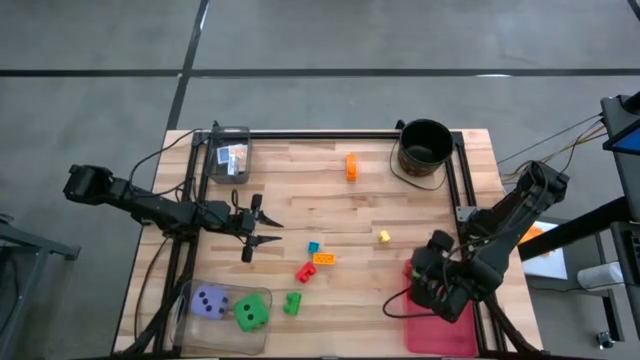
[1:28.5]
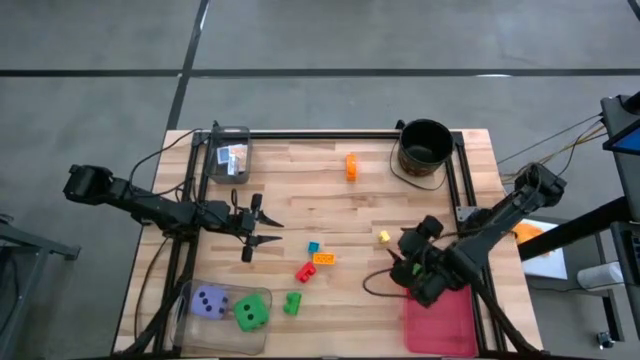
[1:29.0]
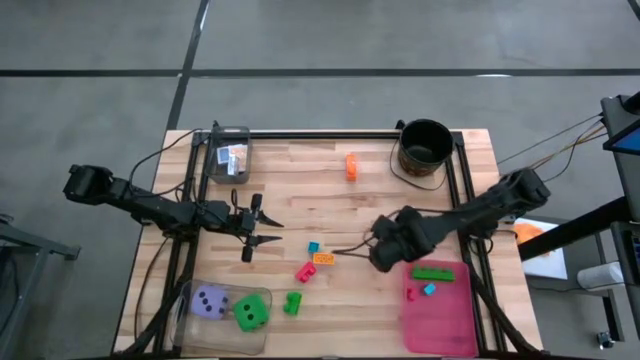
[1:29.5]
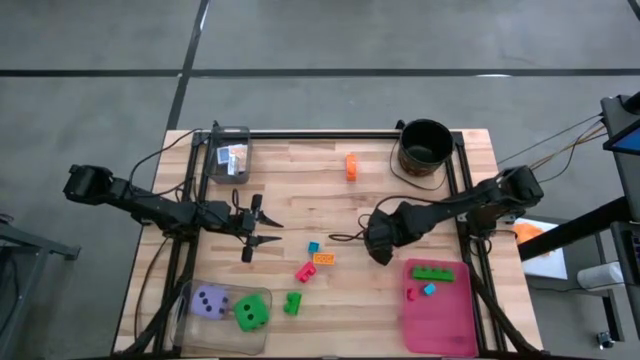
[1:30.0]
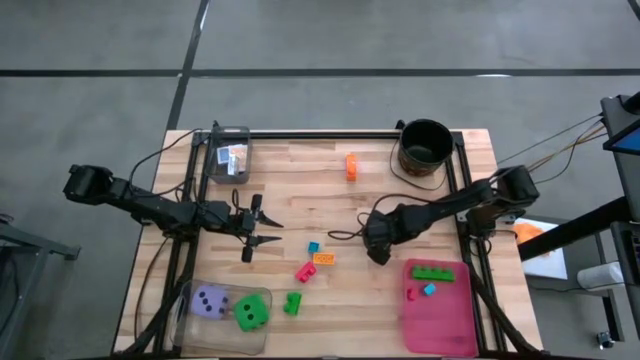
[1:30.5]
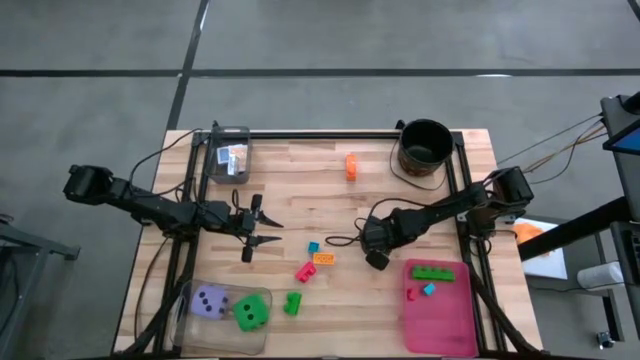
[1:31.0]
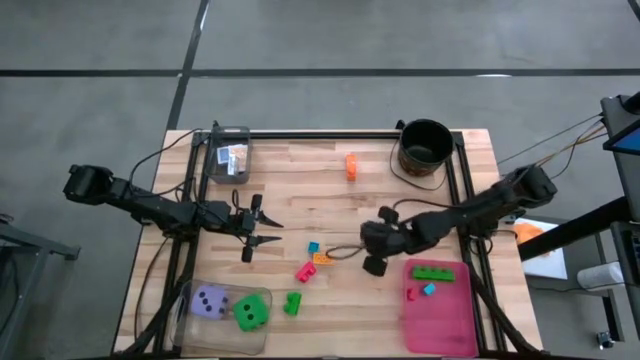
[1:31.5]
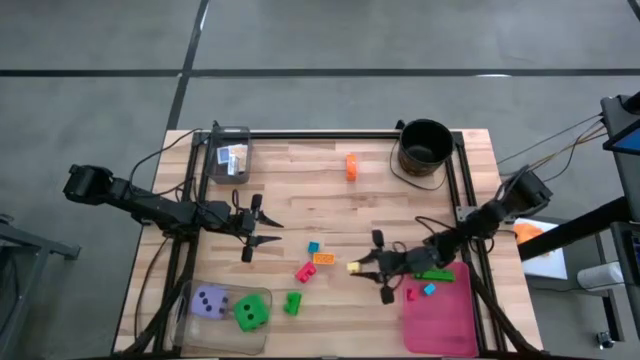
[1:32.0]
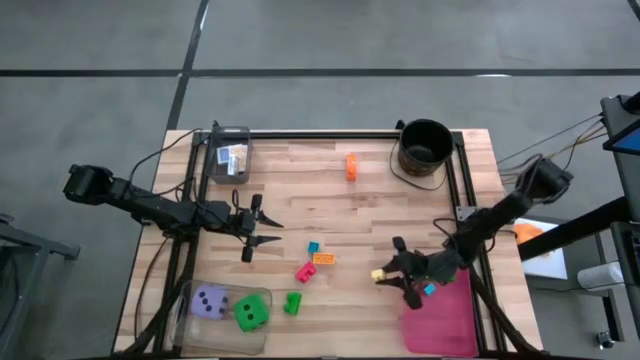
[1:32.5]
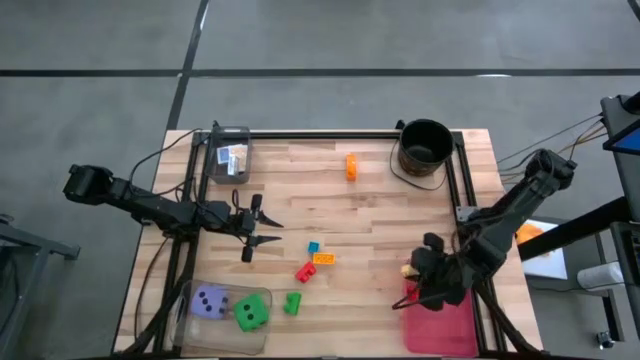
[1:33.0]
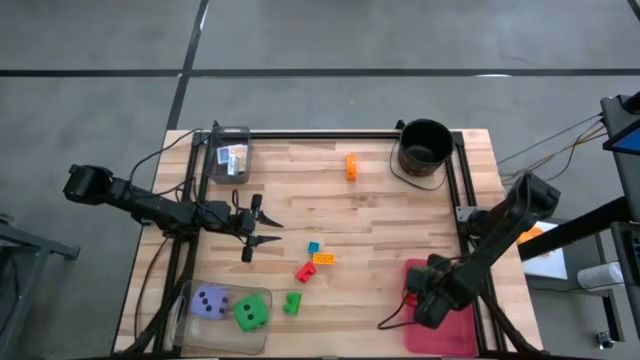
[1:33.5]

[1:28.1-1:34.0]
Task: Pick & Place Toys
Put the light yellow game piece into the pink bin

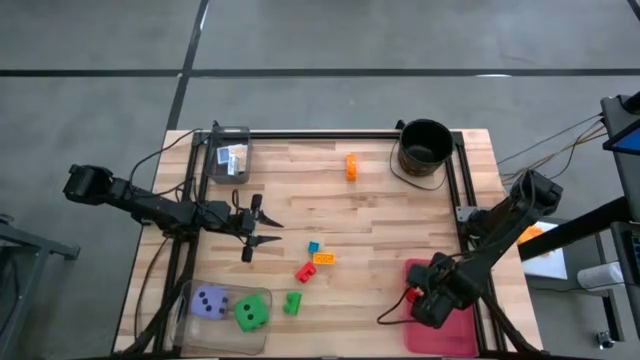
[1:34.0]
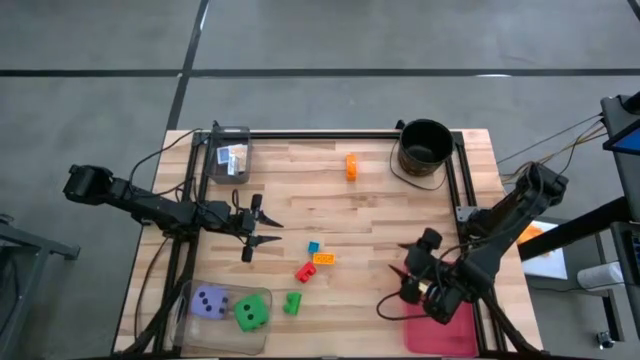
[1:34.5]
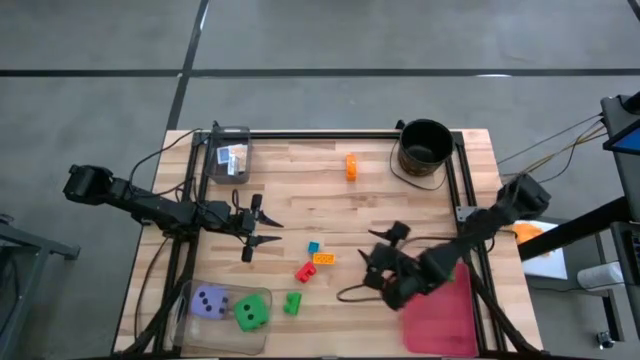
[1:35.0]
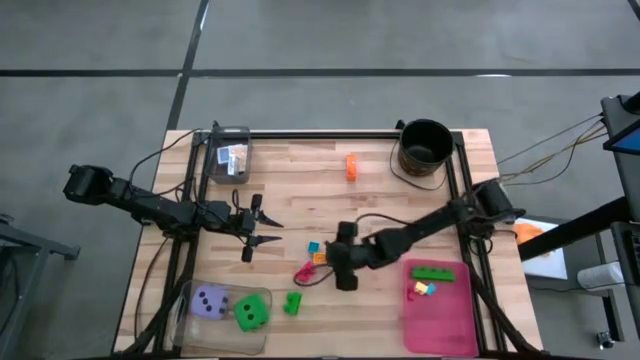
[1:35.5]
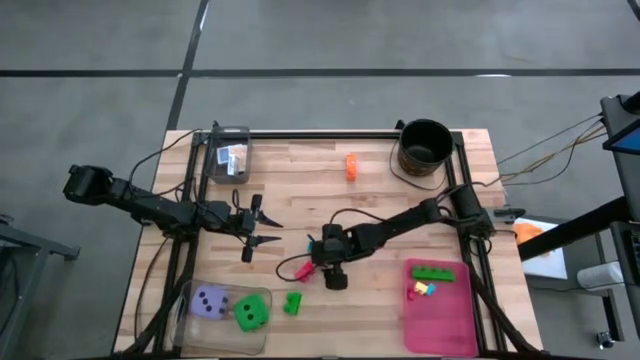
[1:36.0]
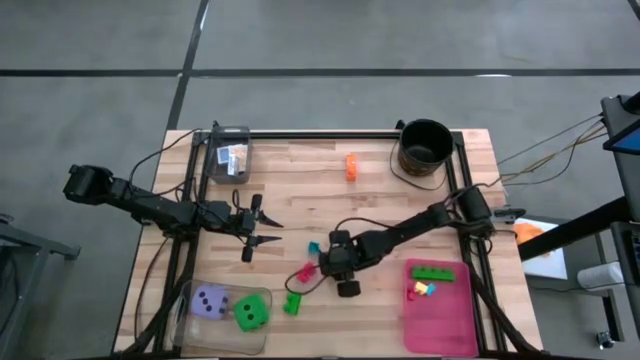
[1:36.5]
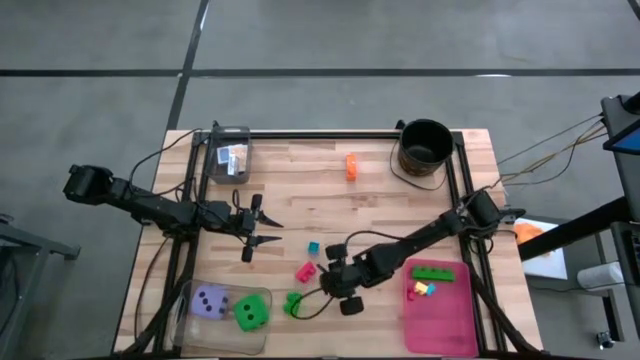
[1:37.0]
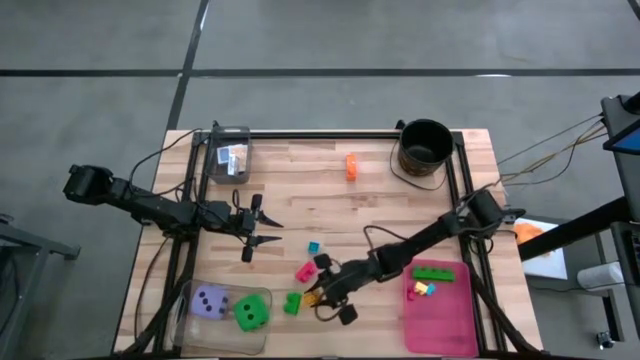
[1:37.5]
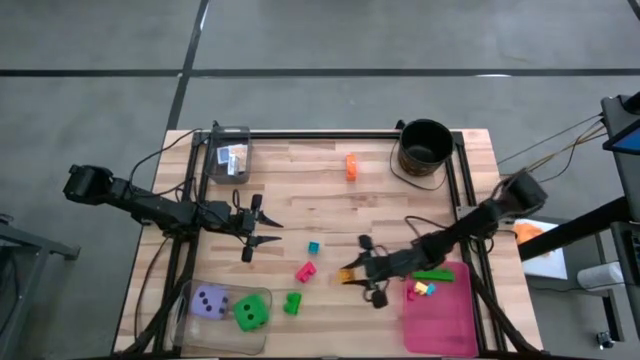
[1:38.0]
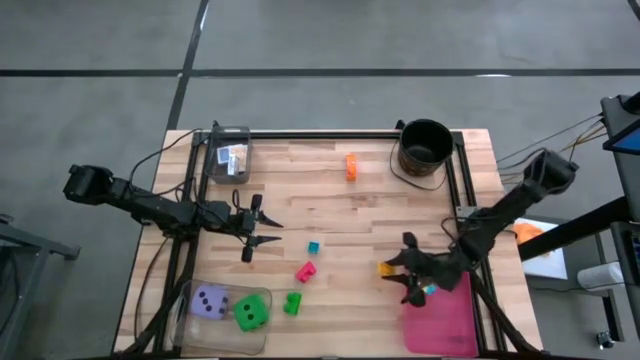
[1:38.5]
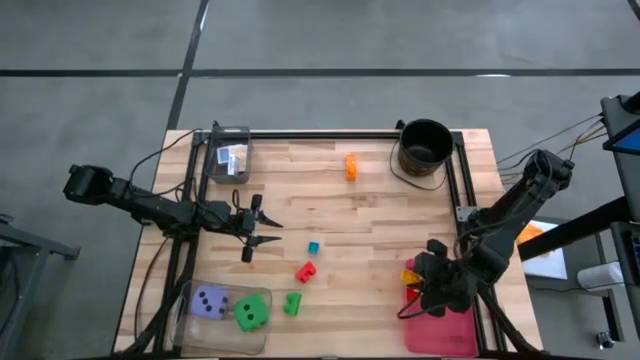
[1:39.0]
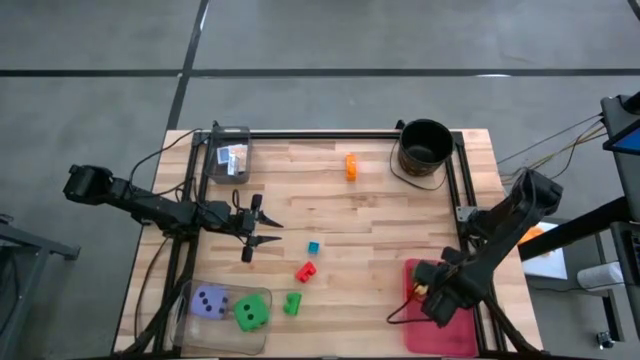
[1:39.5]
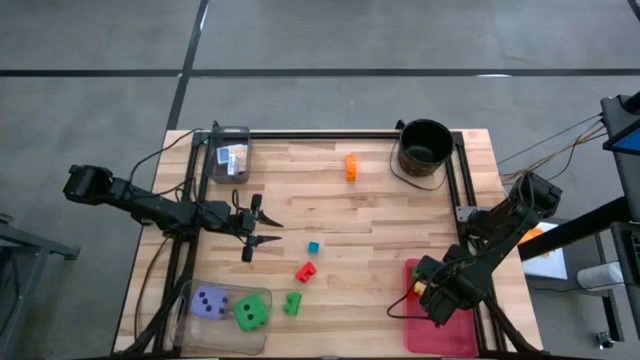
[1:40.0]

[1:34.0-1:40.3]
Put the yellow game piece into the pink bin

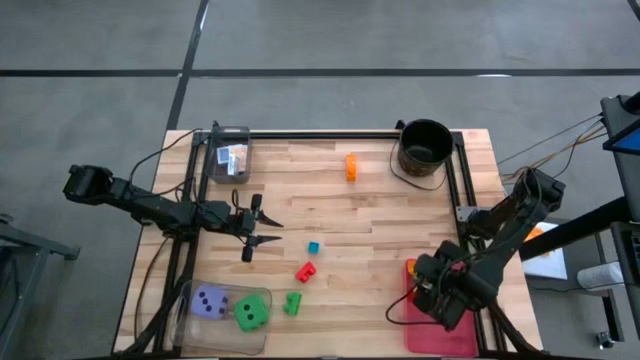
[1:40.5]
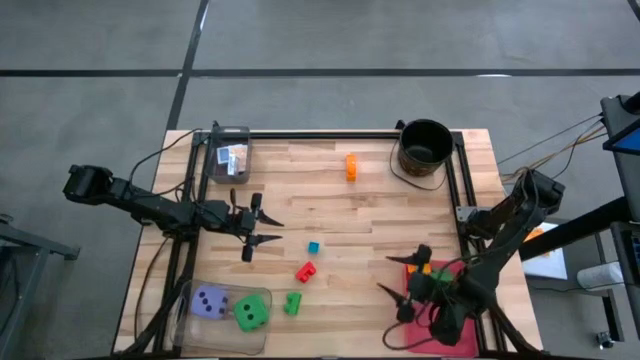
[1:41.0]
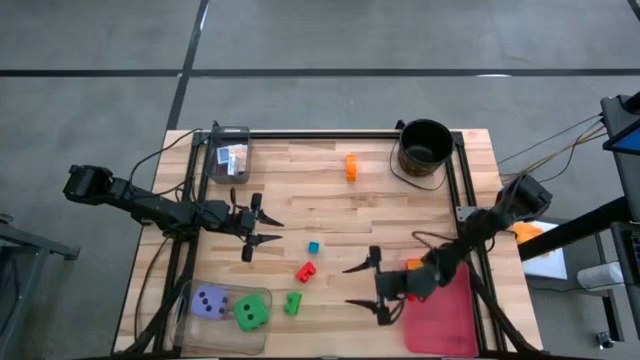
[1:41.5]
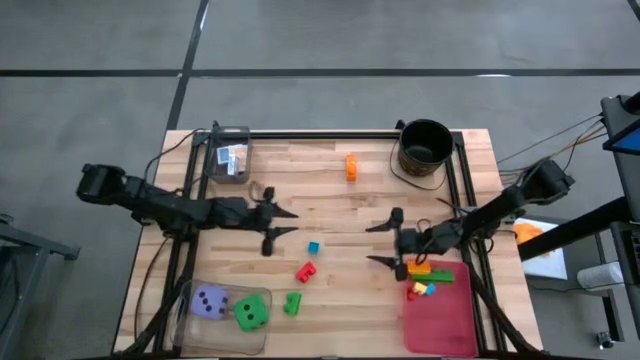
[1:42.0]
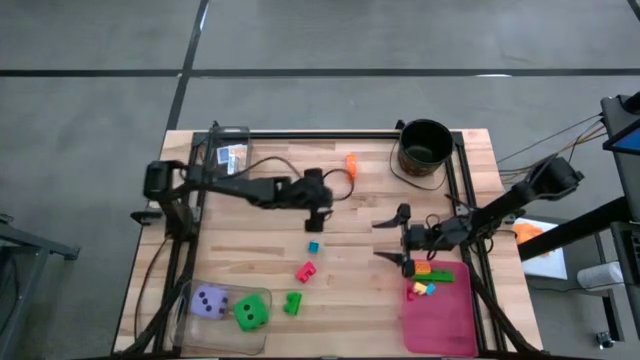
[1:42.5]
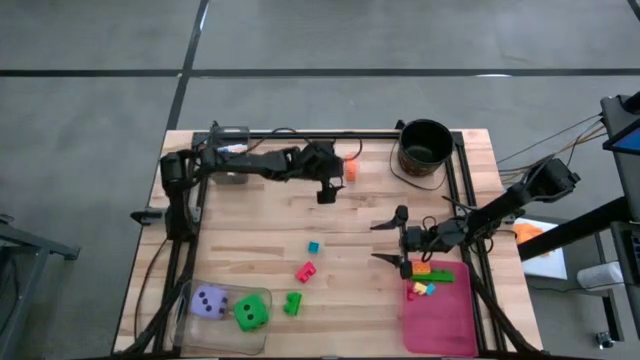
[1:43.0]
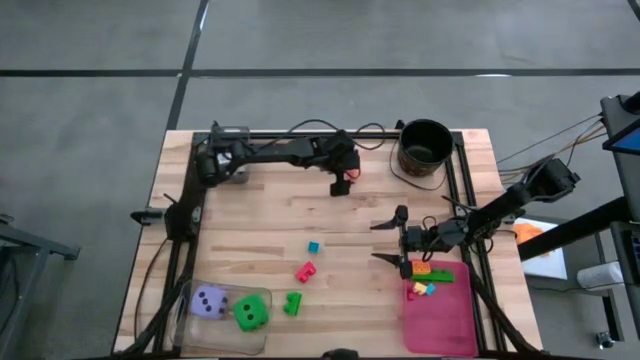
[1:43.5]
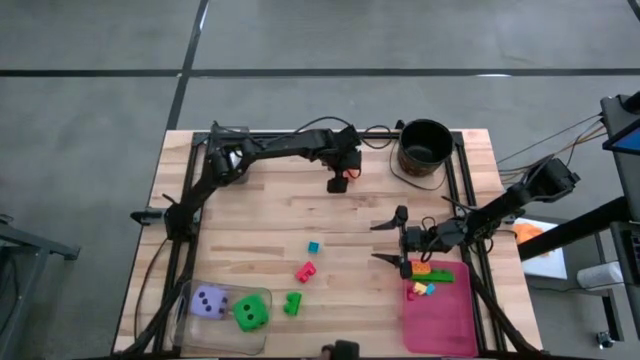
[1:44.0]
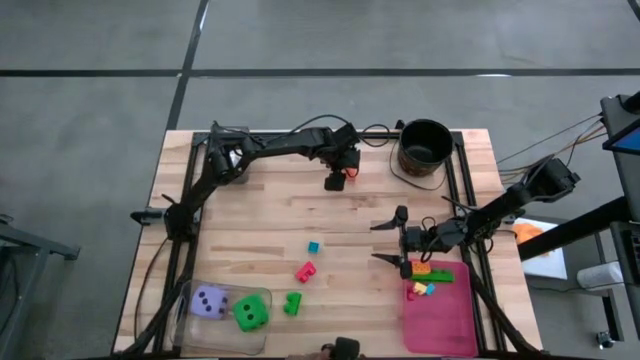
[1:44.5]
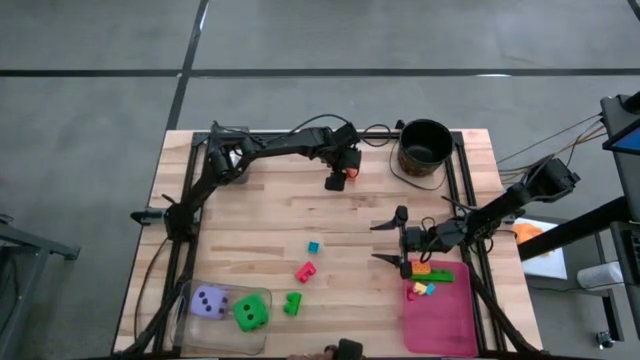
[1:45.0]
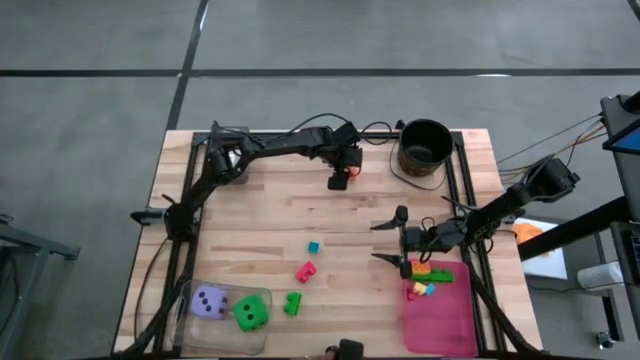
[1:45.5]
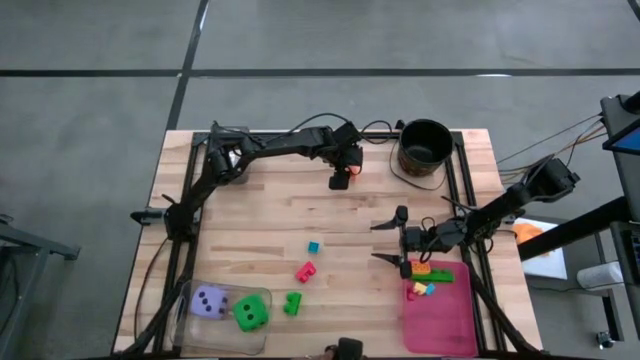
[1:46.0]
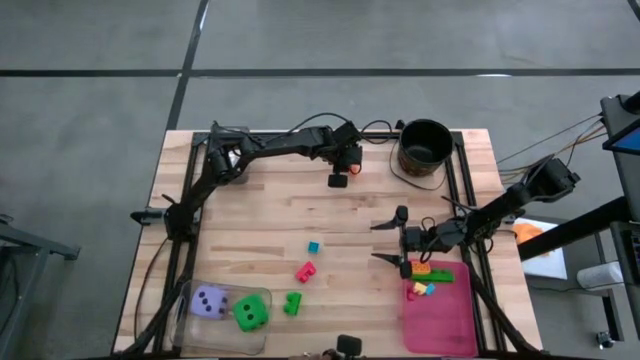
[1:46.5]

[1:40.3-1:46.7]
Put the orange game piece into the pink bin

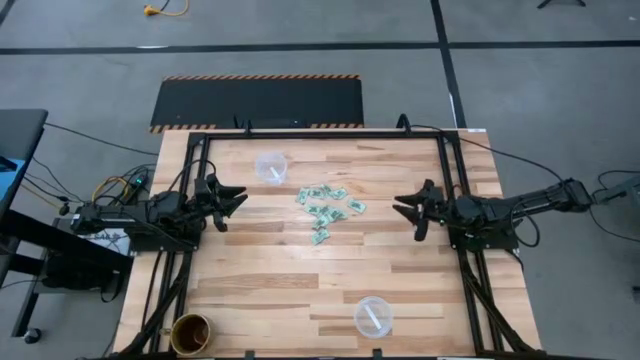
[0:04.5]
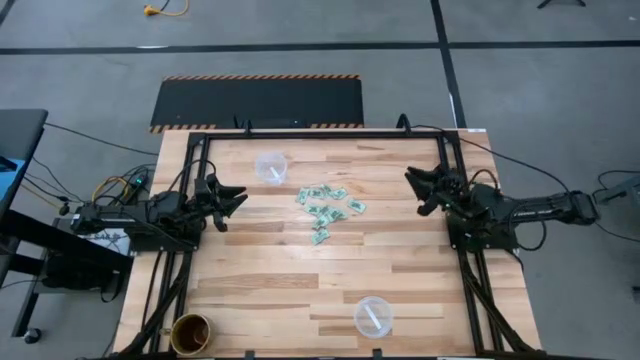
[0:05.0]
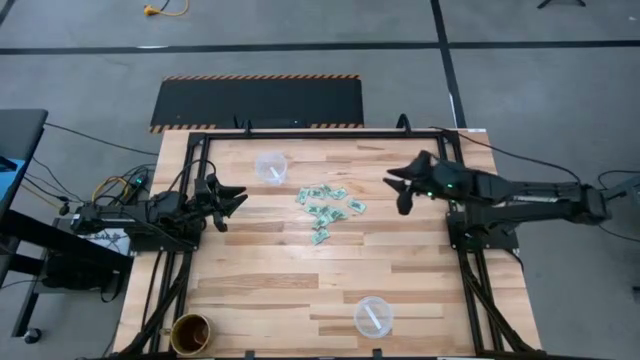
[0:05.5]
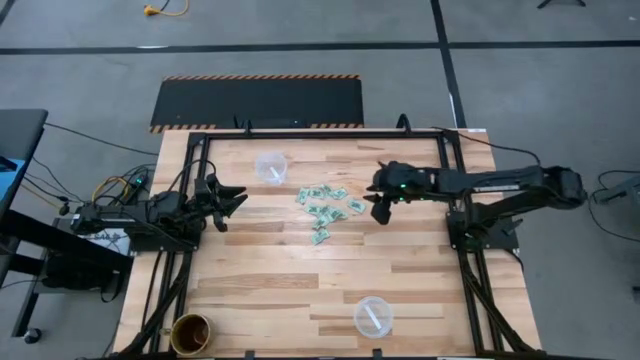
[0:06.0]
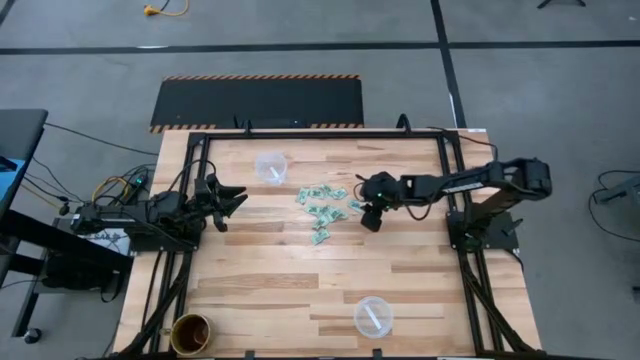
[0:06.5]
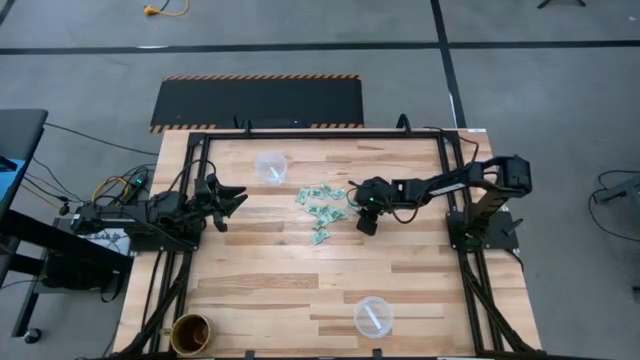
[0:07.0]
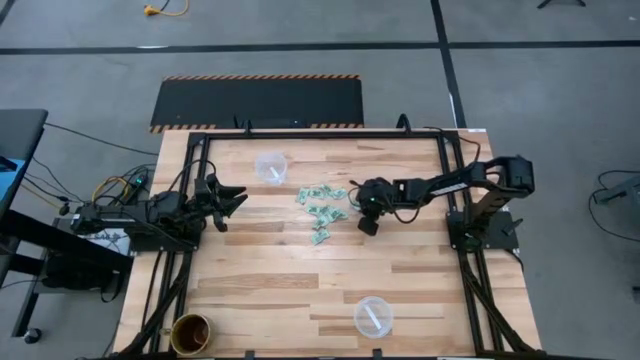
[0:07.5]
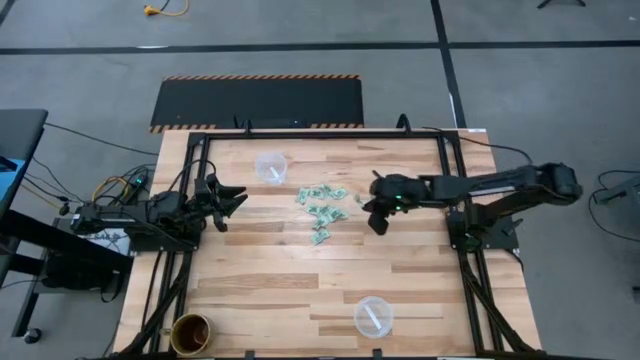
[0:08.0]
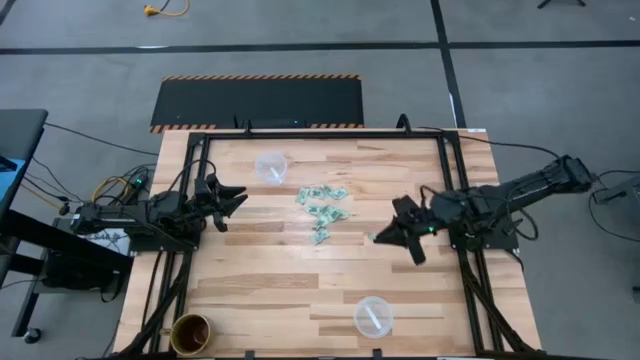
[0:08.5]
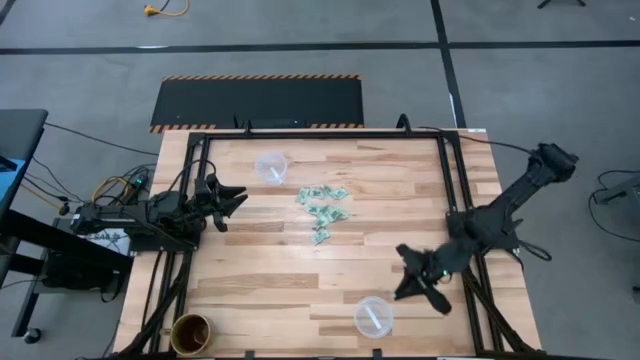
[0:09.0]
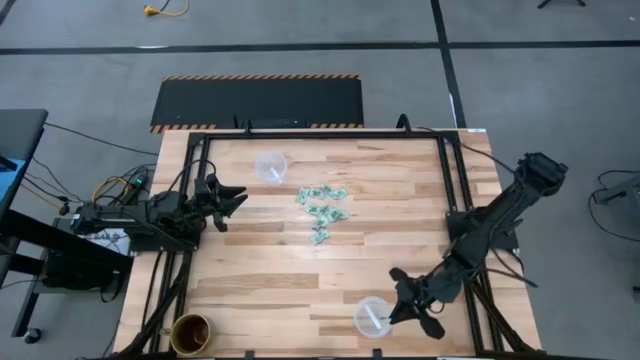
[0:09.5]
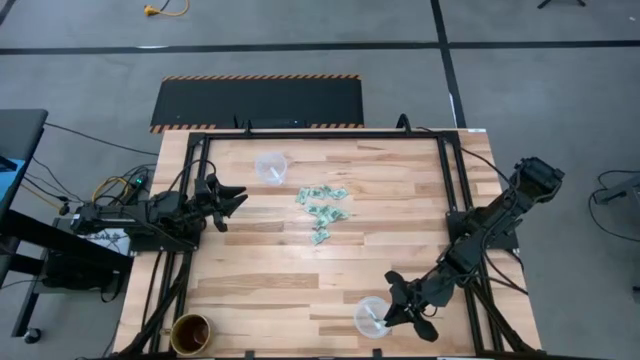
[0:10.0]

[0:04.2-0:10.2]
Task: Pick and place Stevia / Truvia into bins
Put the white stevia packet into the bottom transparent container
